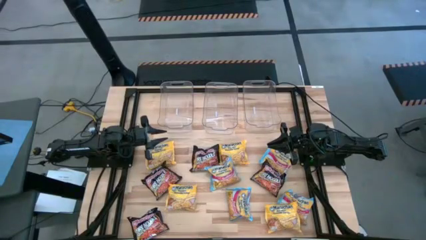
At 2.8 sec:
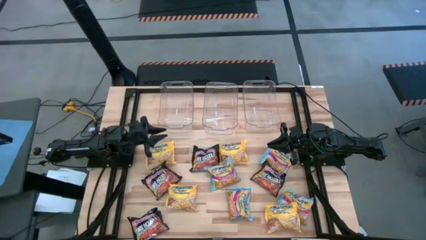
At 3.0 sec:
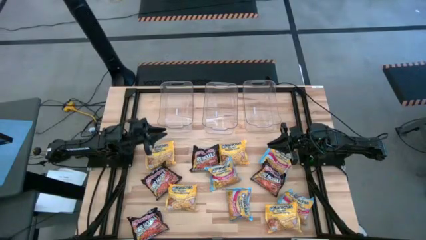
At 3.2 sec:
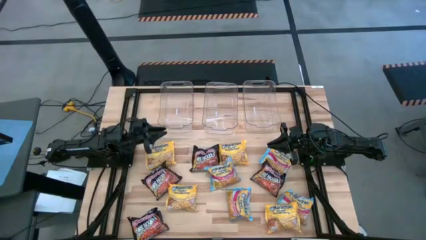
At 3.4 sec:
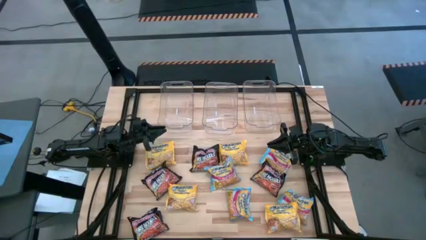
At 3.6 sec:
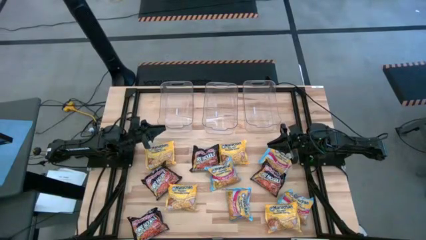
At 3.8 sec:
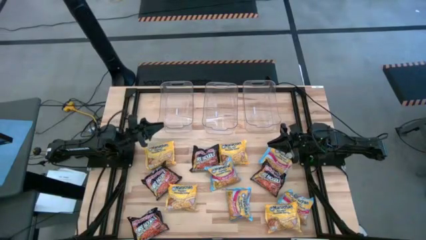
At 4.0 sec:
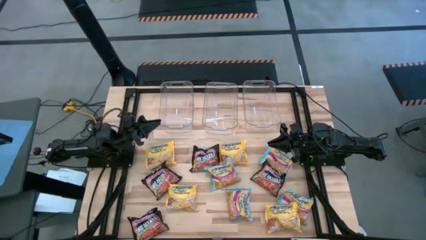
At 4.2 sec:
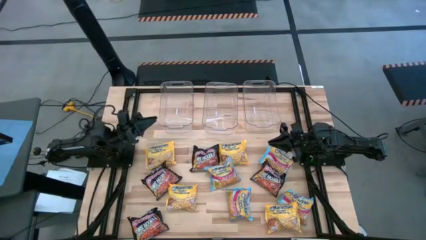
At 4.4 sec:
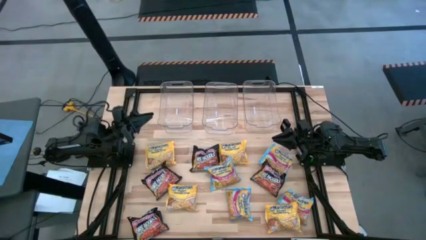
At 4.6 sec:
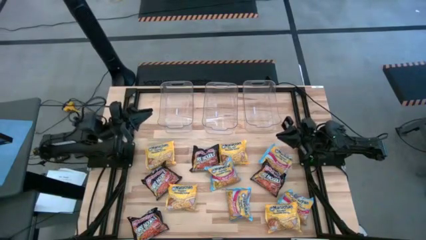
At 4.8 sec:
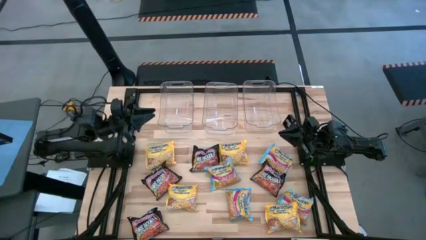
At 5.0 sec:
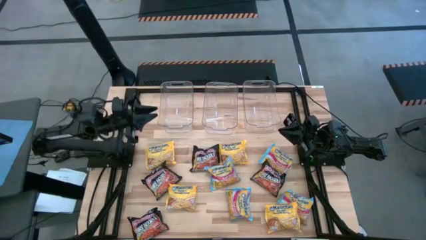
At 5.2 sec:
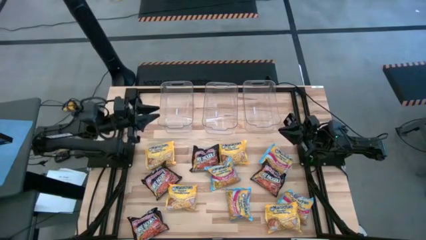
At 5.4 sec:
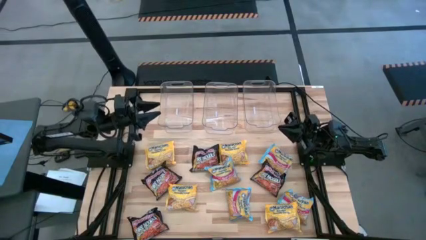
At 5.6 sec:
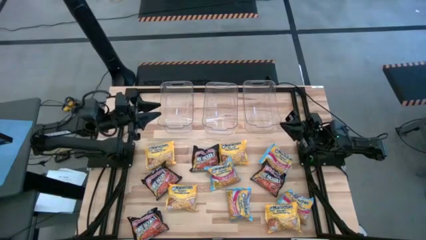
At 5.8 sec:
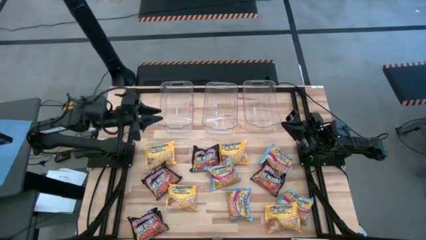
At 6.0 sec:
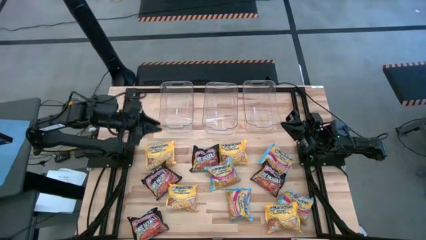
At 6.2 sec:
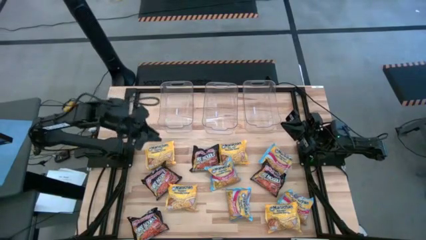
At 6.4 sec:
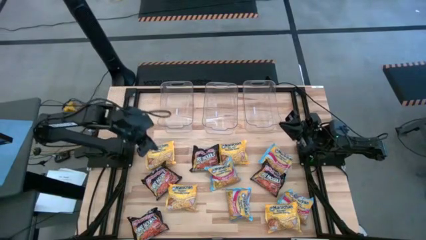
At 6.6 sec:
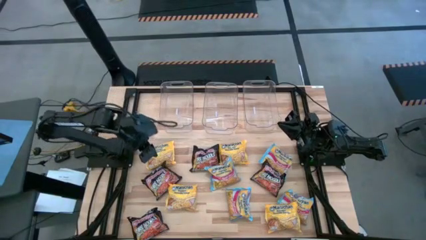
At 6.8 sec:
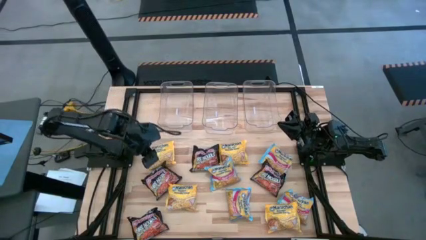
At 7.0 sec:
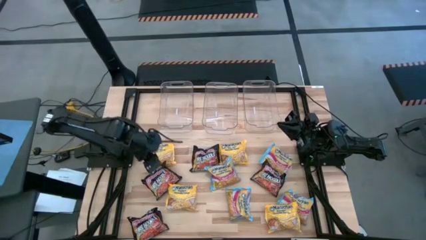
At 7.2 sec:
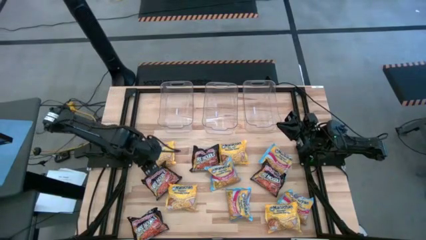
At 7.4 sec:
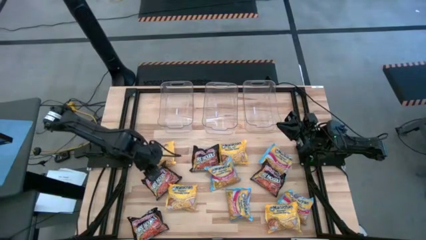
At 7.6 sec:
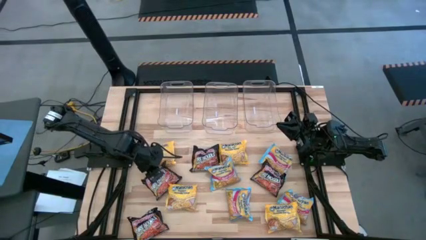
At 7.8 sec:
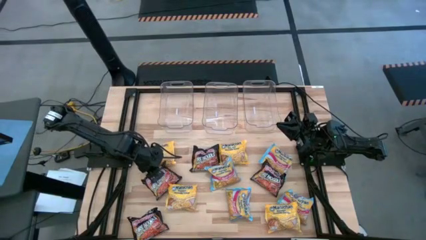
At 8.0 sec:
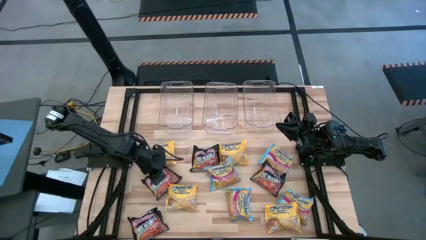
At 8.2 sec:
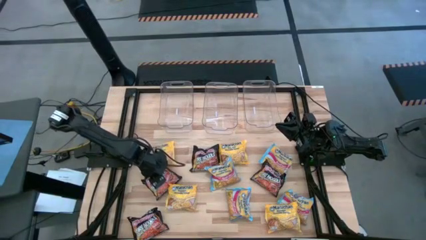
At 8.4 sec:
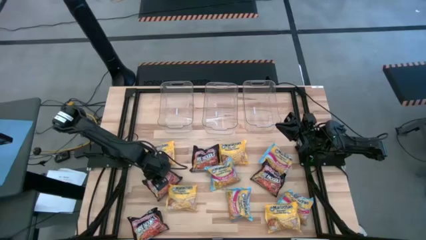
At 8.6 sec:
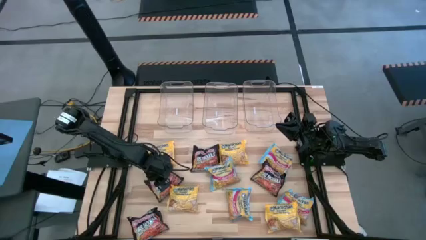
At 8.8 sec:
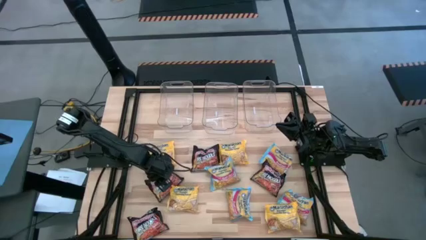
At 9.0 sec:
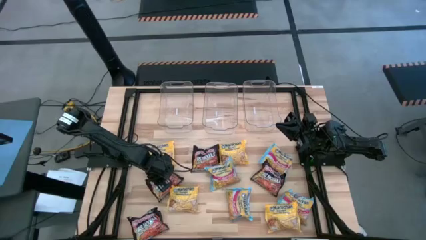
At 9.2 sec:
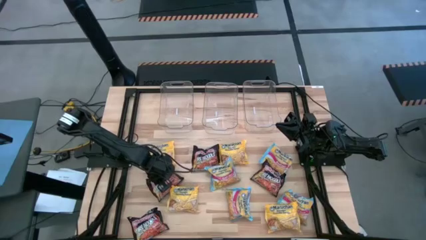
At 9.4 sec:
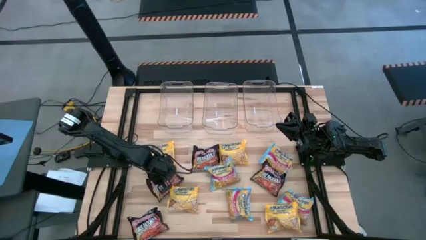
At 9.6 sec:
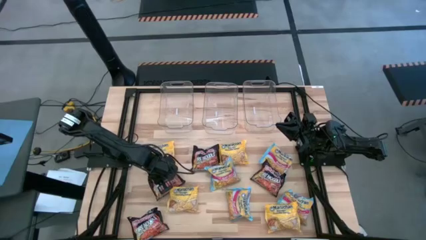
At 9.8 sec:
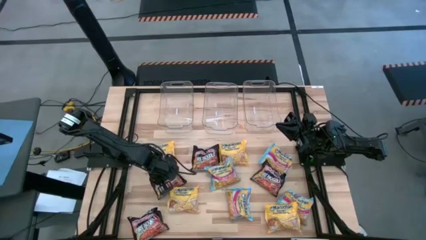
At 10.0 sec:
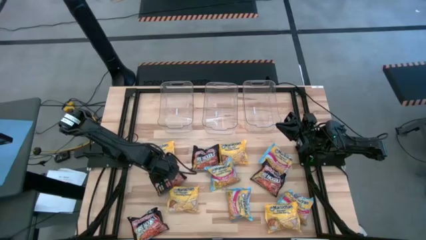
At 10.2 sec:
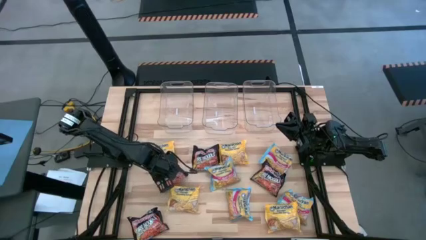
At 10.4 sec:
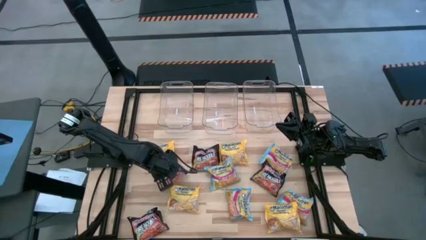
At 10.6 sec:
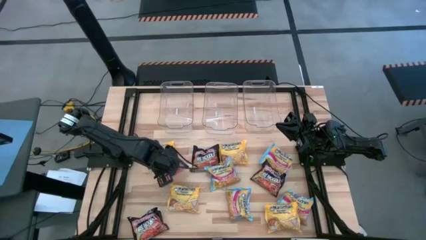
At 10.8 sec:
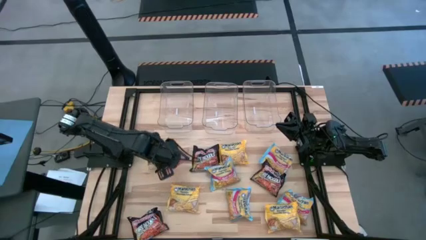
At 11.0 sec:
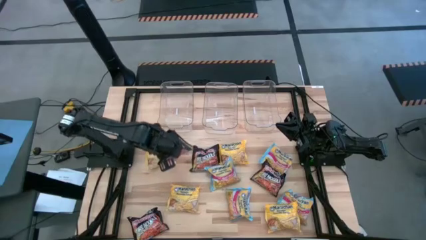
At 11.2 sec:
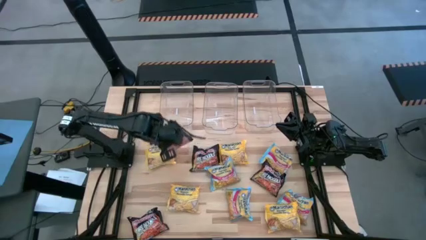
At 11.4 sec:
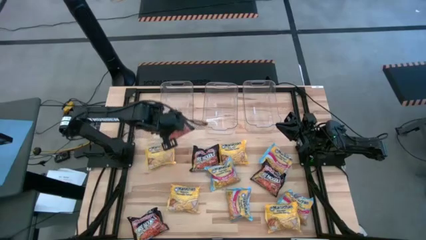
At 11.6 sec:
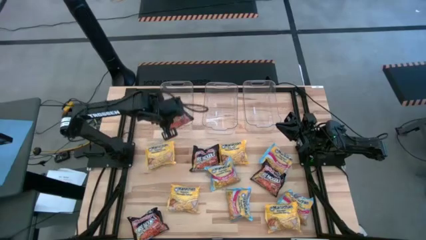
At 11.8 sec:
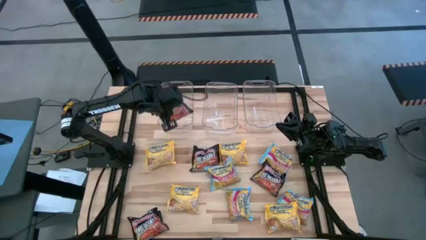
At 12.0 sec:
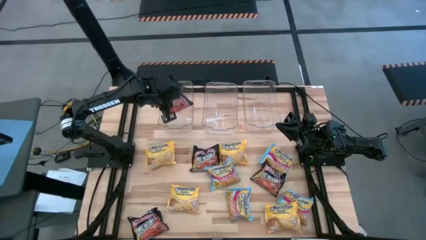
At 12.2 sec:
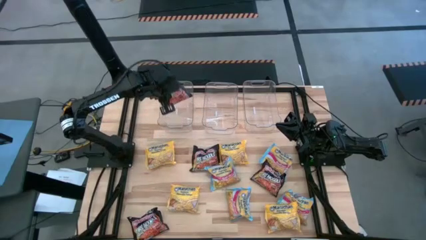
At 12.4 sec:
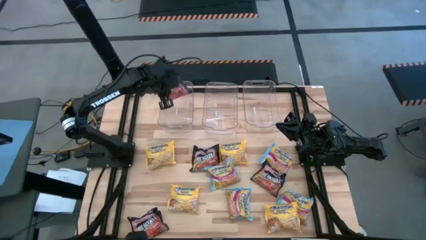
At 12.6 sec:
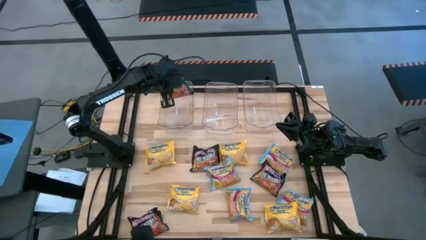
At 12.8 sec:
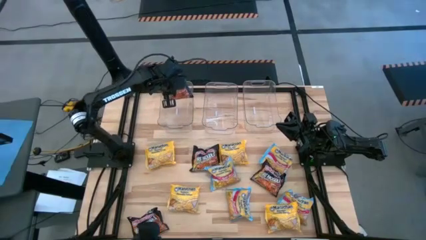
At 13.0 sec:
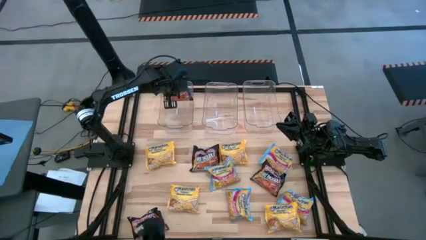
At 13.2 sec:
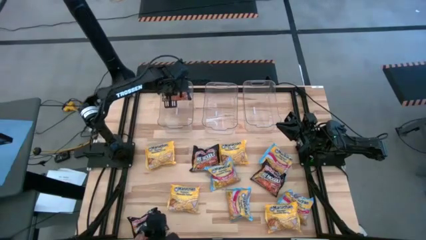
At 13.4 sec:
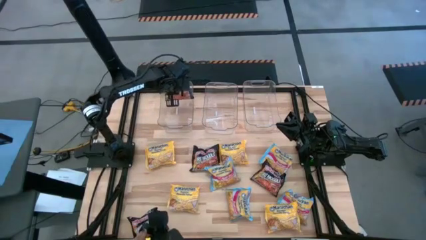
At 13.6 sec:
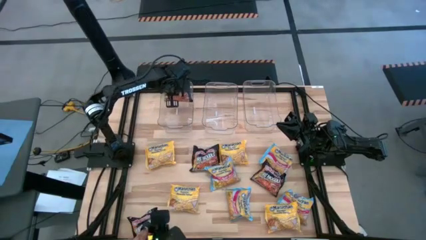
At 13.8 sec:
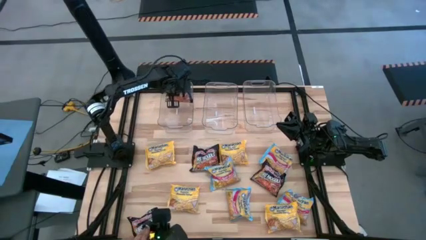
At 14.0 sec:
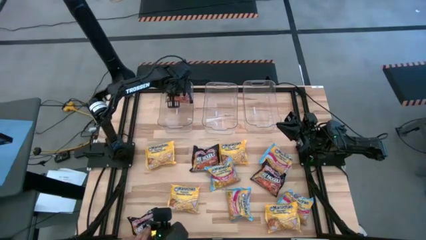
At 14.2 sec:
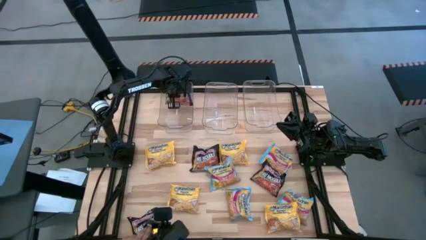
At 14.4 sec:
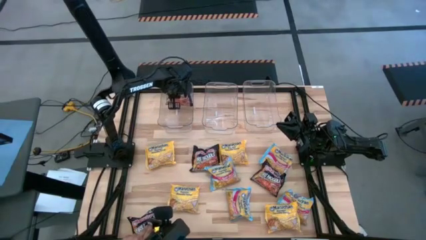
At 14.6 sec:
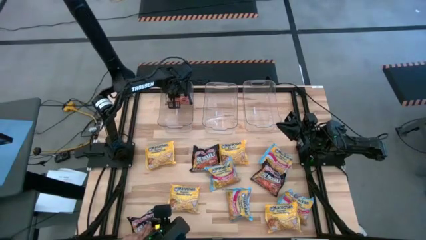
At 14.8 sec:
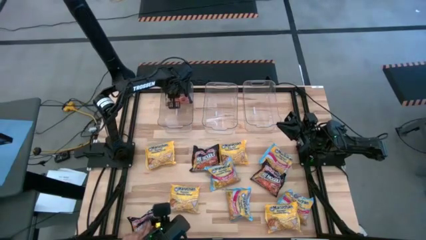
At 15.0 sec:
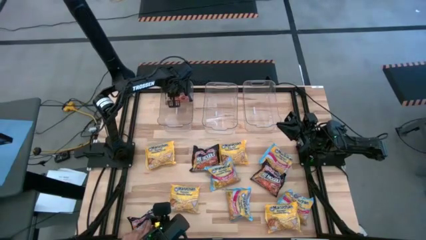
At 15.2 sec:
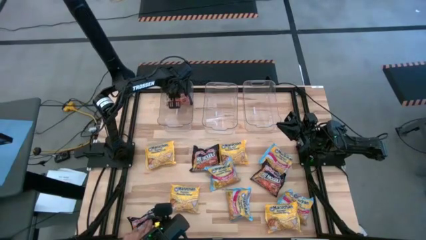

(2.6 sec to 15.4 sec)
Task: Sort Maruchan noodles
Put the black noodle pack into the left transparent bin

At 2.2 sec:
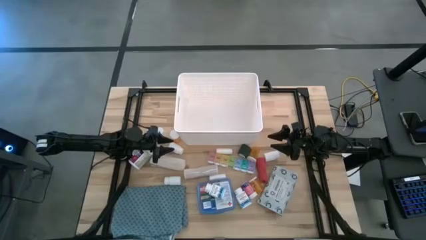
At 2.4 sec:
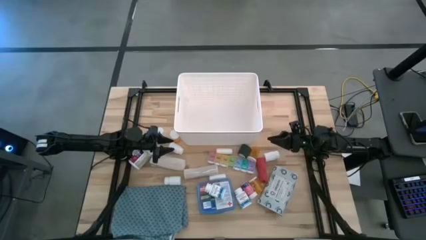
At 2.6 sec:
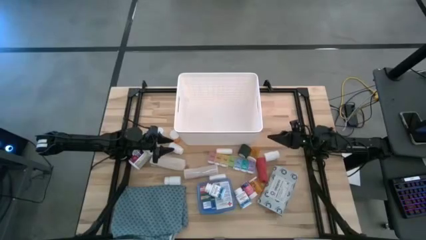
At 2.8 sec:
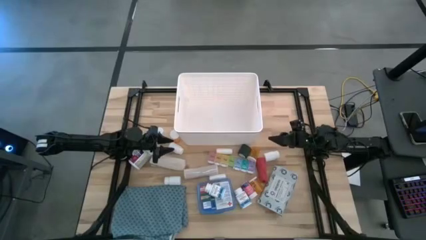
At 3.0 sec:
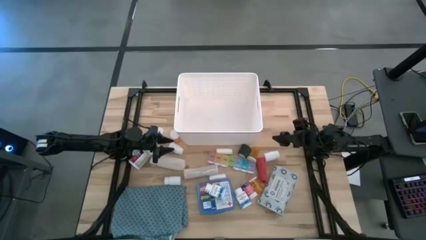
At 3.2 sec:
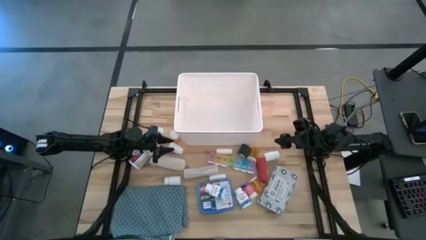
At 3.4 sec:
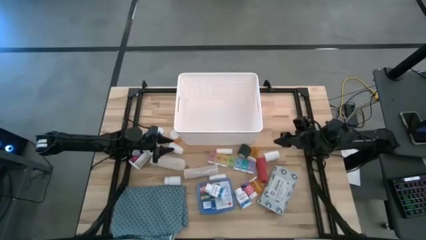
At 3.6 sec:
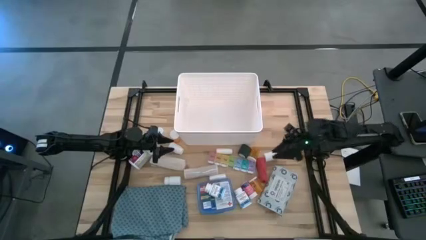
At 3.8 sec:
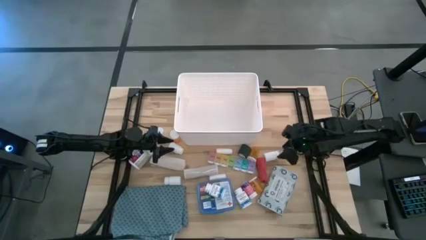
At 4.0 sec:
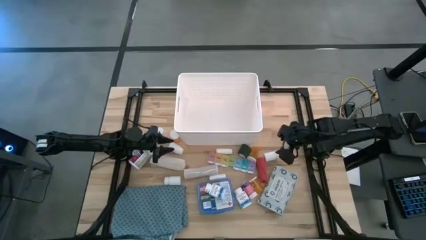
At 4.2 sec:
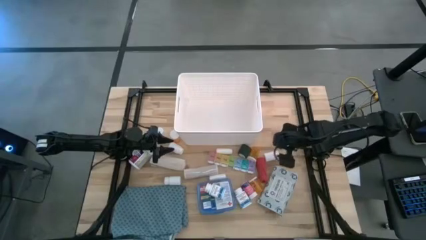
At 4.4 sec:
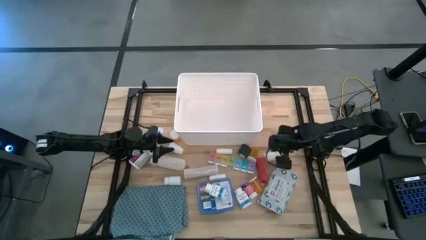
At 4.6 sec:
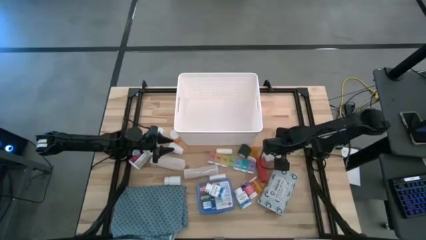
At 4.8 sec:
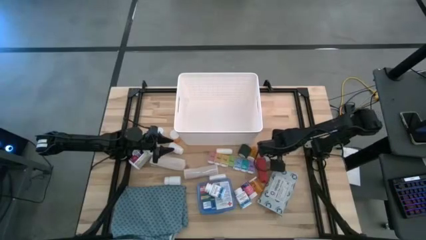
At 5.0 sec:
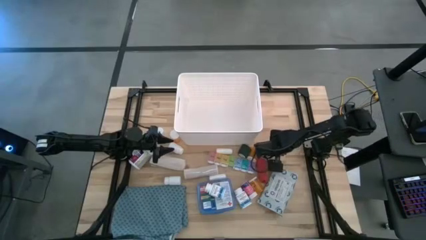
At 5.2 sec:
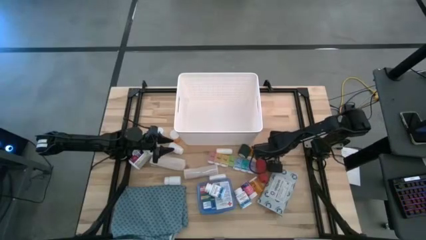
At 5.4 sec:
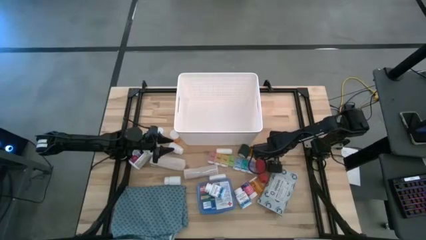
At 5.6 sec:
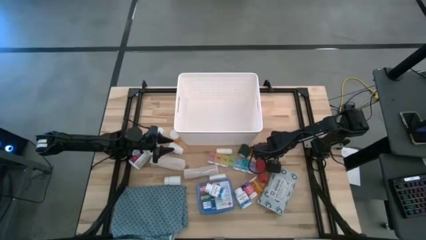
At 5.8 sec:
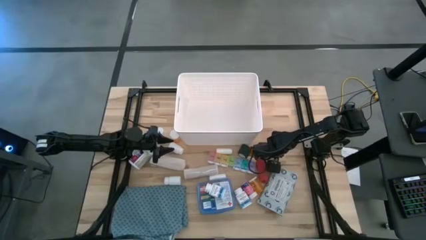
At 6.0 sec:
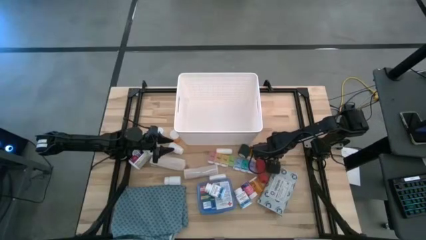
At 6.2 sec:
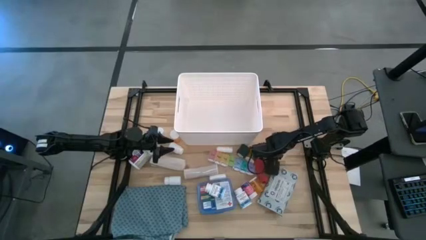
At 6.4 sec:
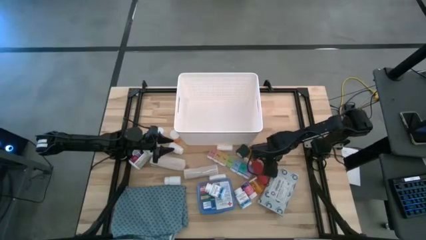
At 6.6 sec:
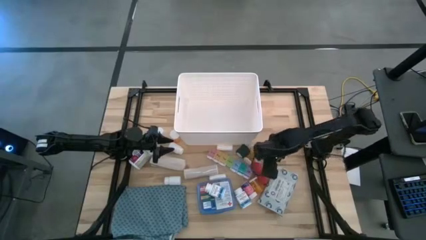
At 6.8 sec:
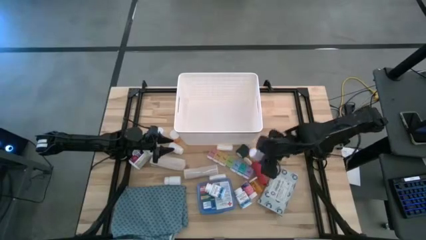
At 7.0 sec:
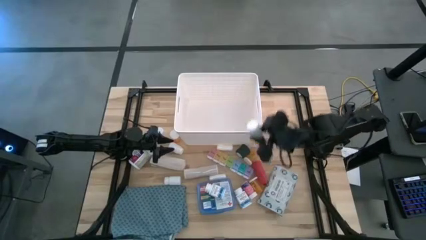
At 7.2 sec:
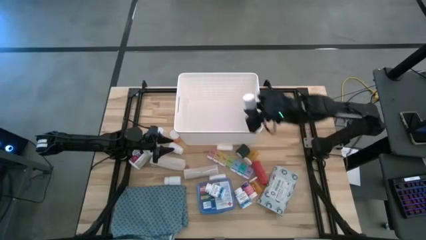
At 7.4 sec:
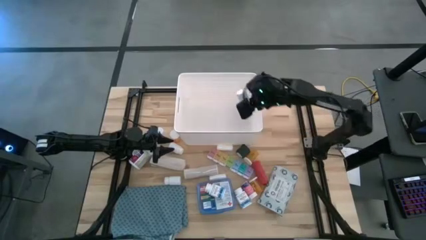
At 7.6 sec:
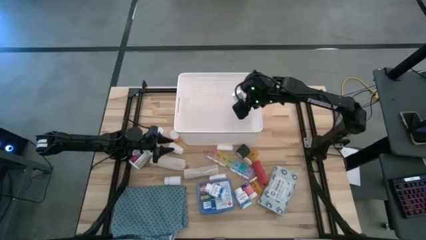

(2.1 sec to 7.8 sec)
Task: Pick & place medical supplies in basket/bin
Put the white medicine bottle into the bin
